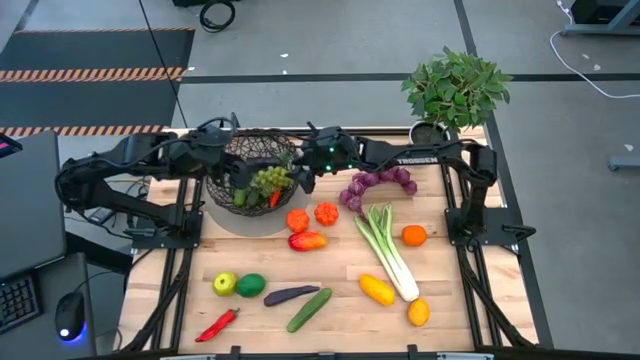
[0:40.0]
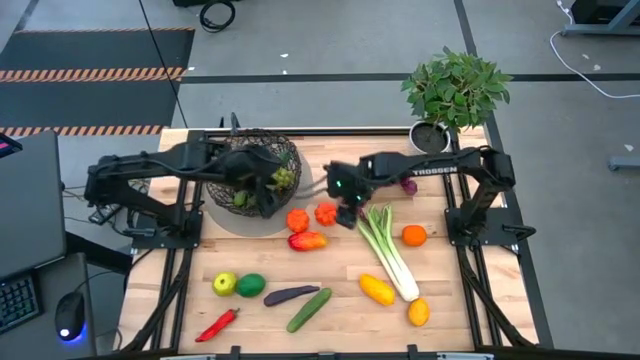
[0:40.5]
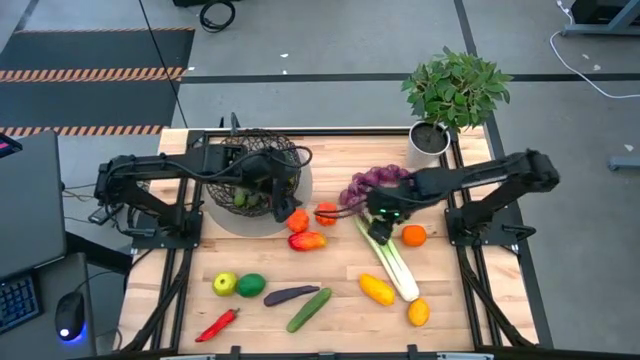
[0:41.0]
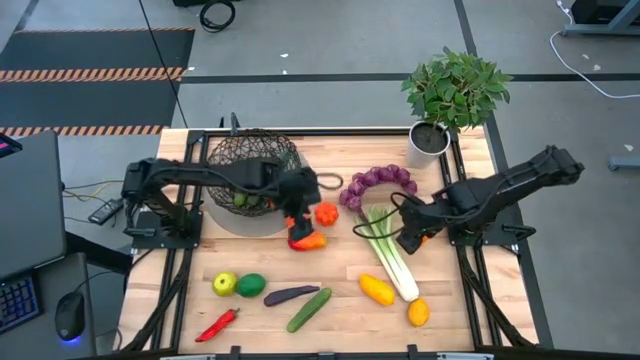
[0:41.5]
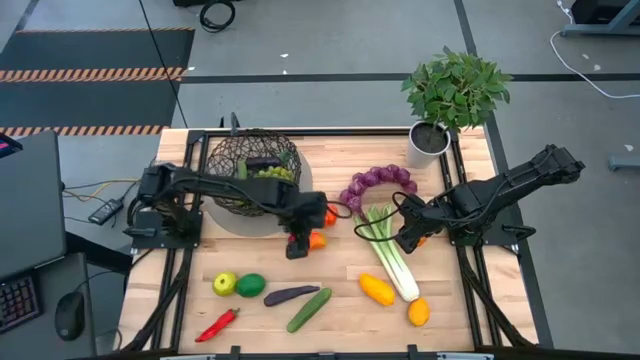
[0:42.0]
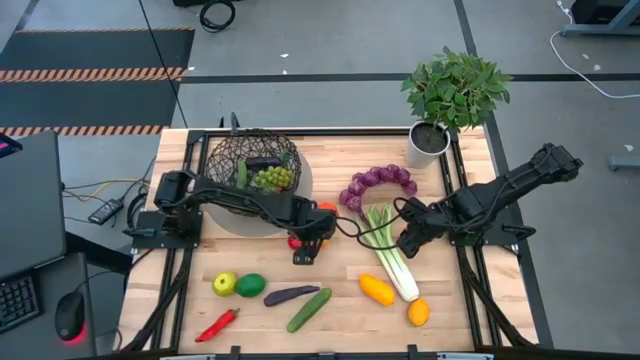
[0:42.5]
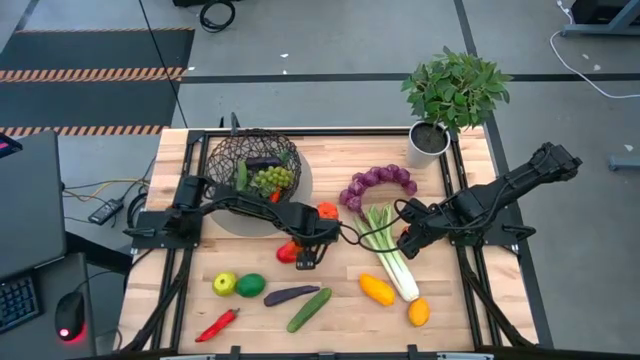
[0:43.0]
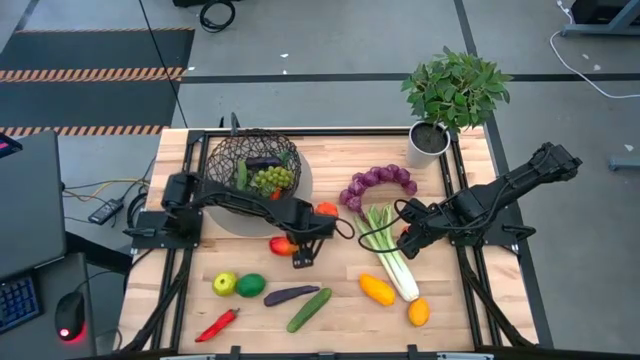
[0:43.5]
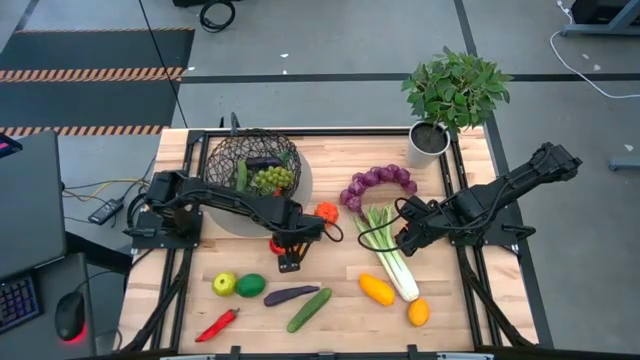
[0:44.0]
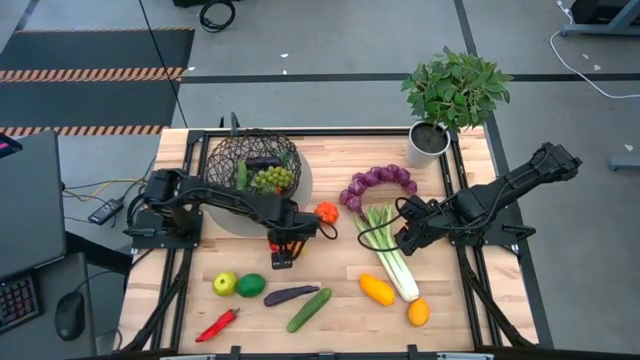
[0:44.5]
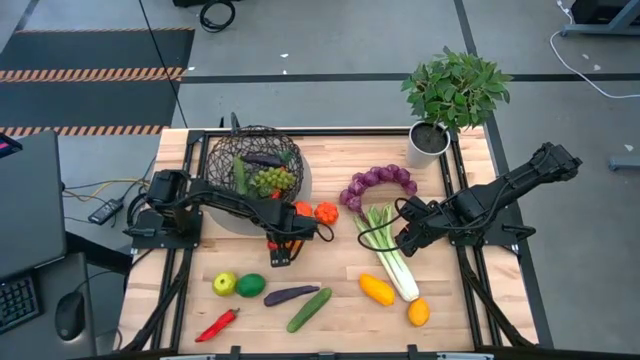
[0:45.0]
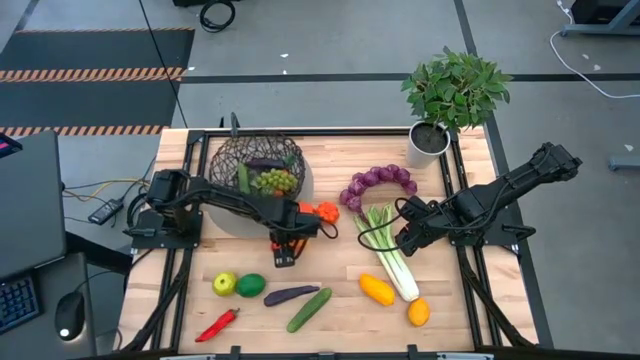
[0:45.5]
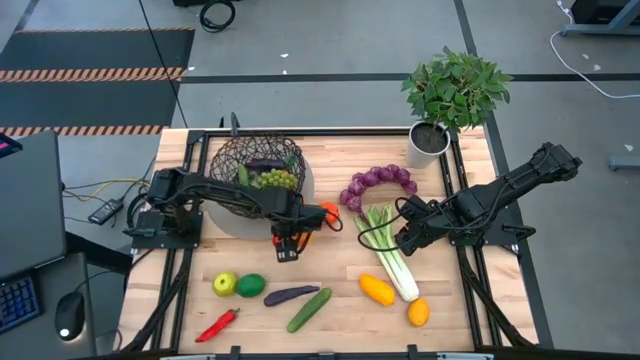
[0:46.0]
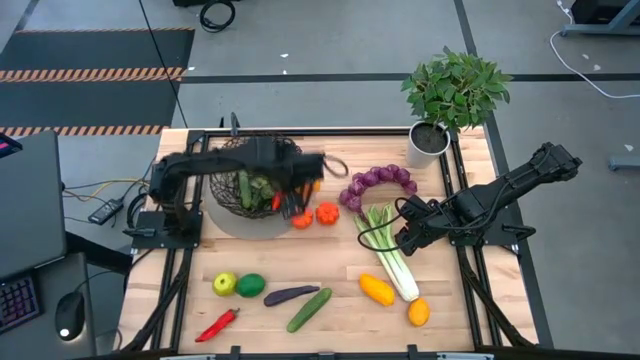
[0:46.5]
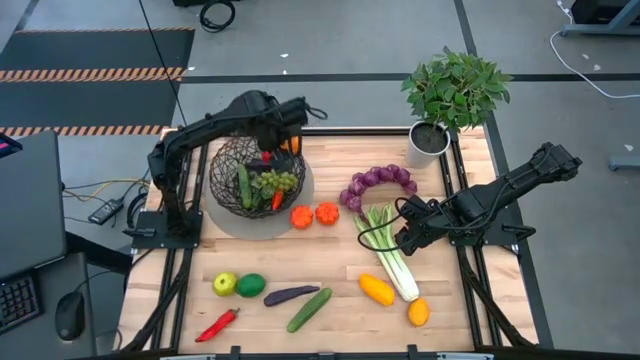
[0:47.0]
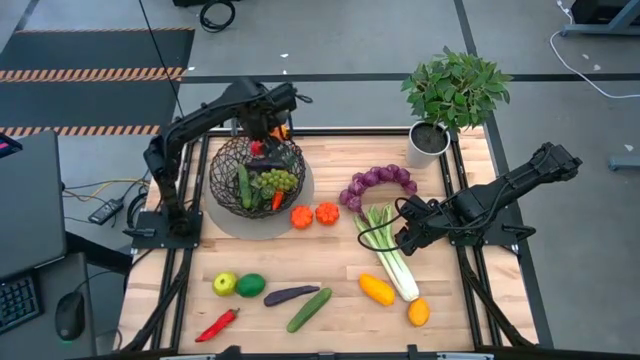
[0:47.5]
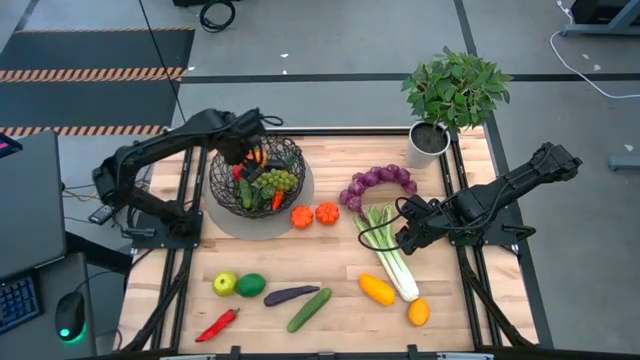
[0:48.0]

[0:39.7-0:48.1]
Task: Build produce basket
Put the red mango into the black wire basket

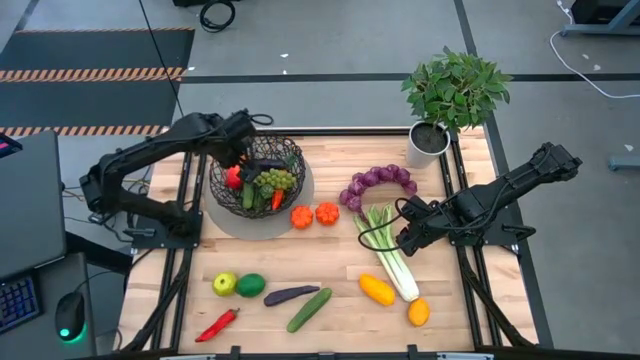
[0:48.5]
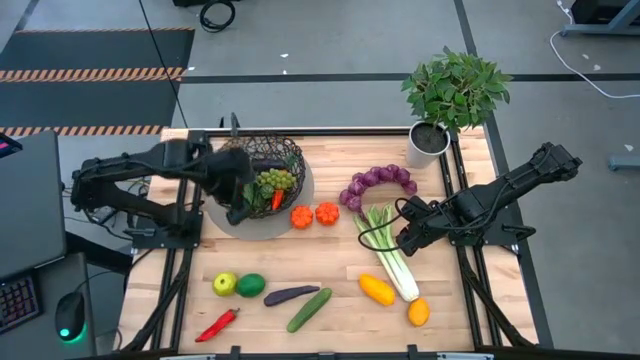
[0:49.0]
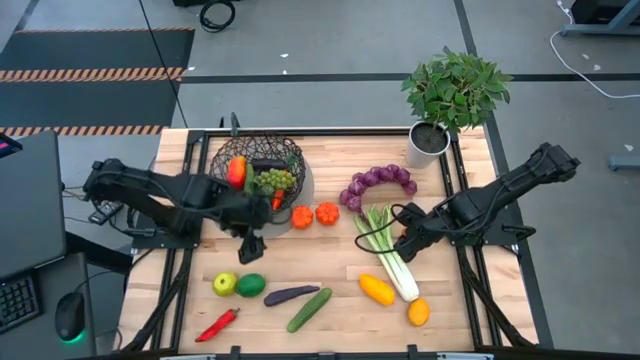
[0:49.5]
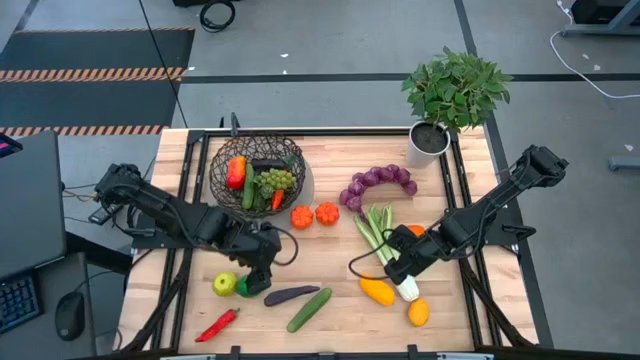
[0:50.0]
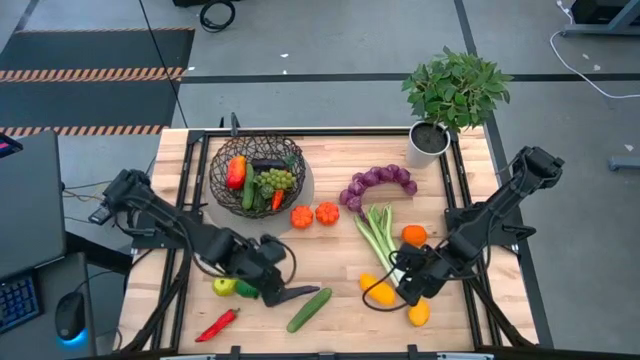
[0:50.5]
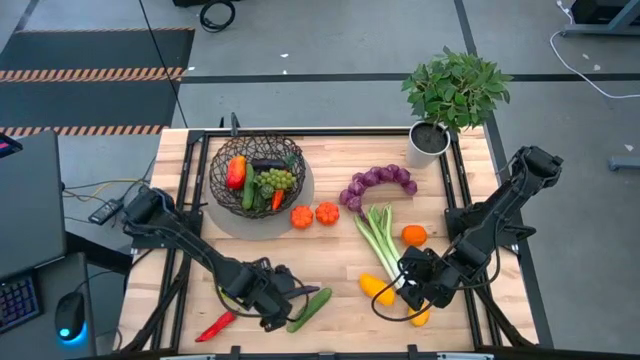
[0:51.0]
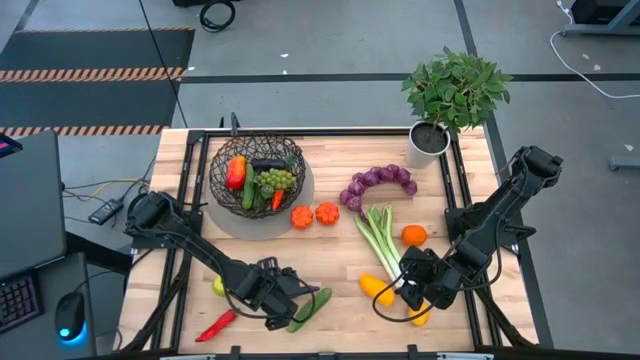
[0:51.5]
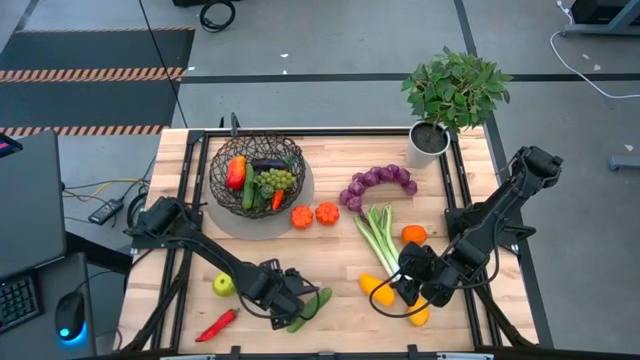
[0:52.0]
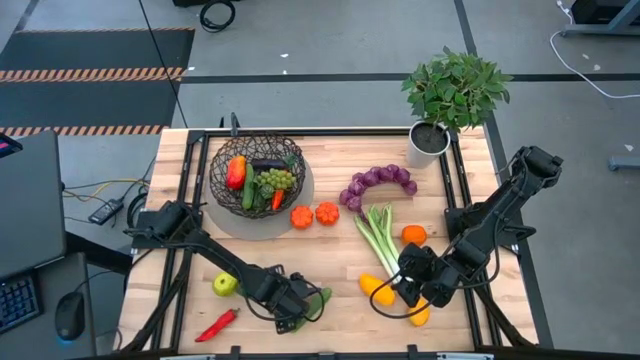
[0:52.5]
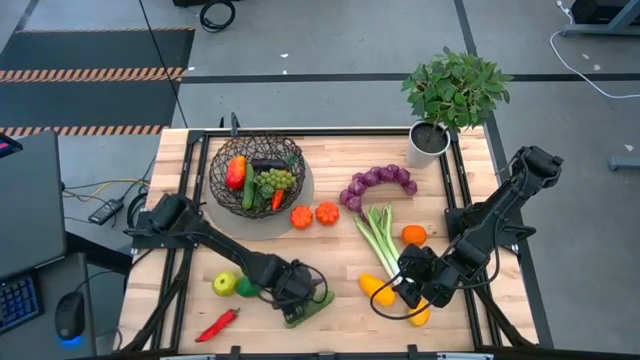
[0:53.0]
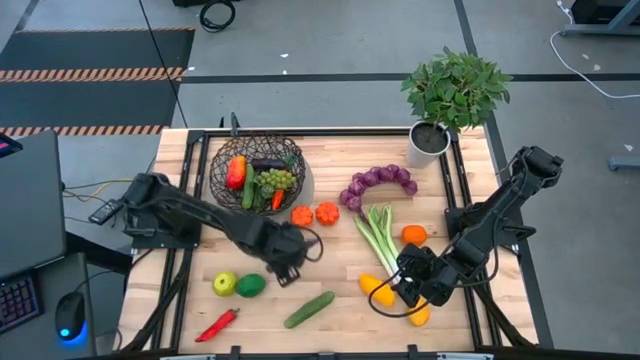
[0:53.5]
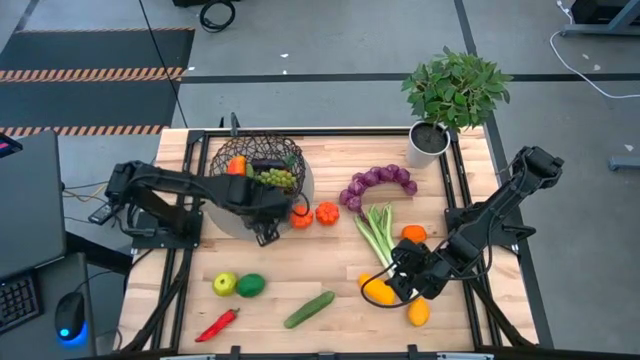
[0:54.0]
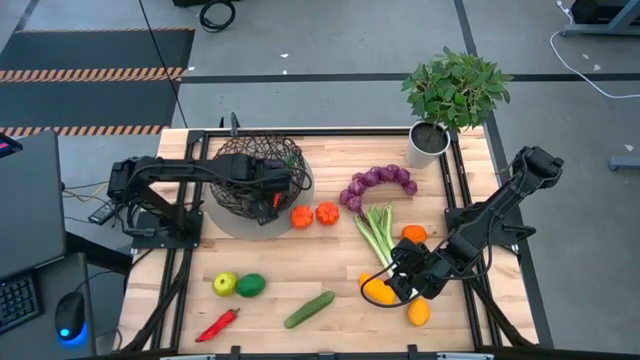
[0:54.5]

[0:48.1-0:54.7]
Put the purple eggplant into the black wire basket

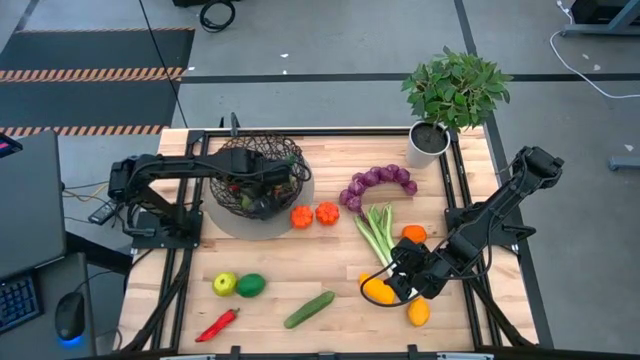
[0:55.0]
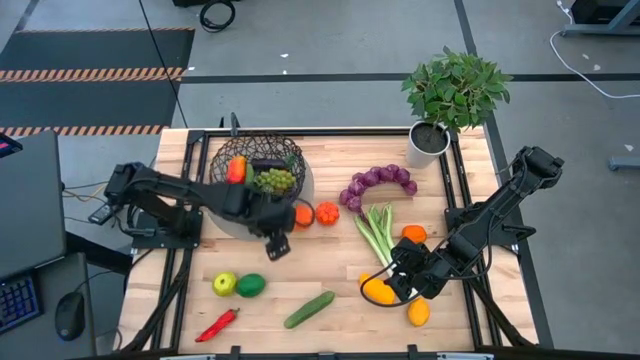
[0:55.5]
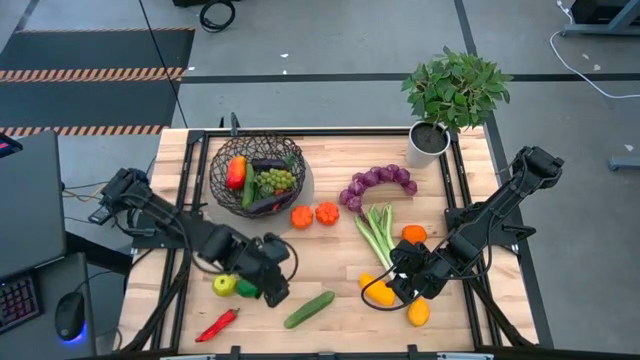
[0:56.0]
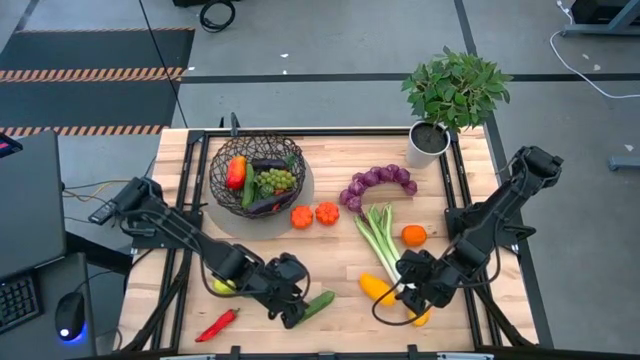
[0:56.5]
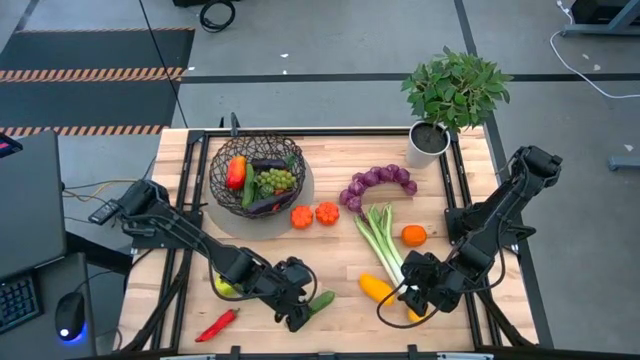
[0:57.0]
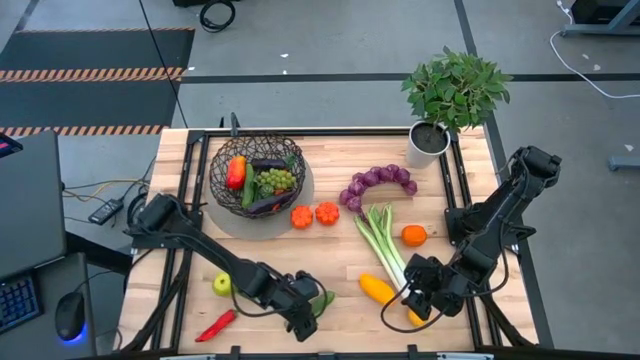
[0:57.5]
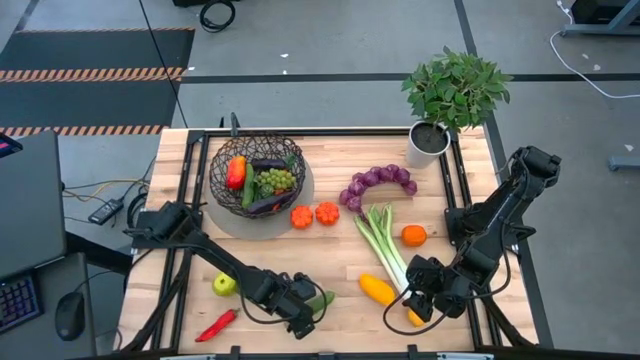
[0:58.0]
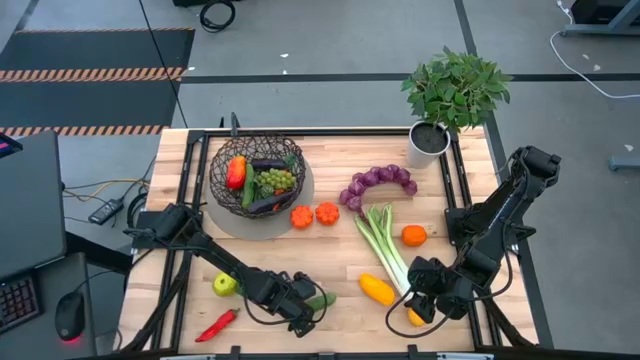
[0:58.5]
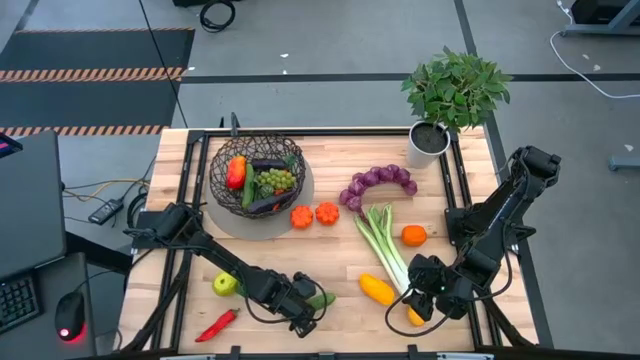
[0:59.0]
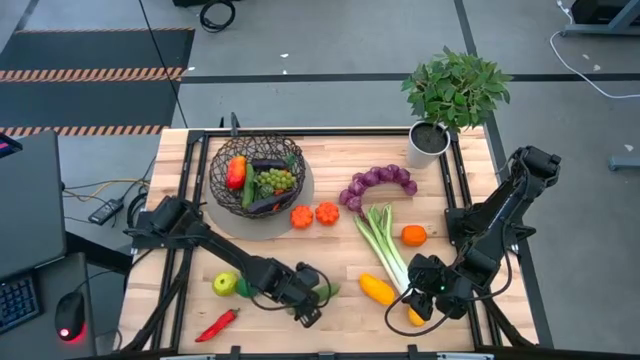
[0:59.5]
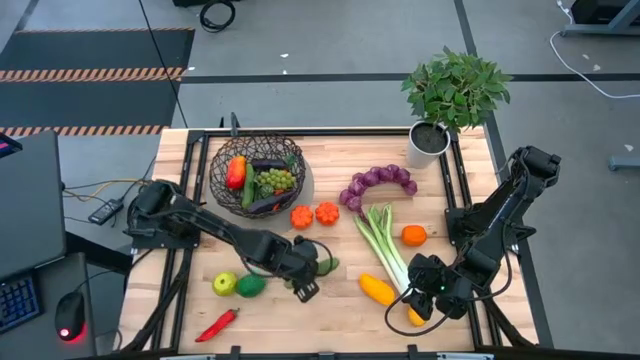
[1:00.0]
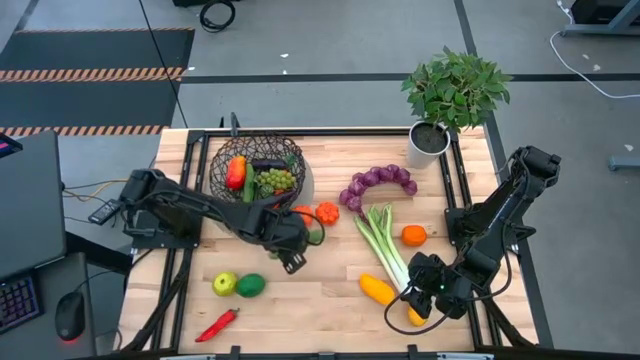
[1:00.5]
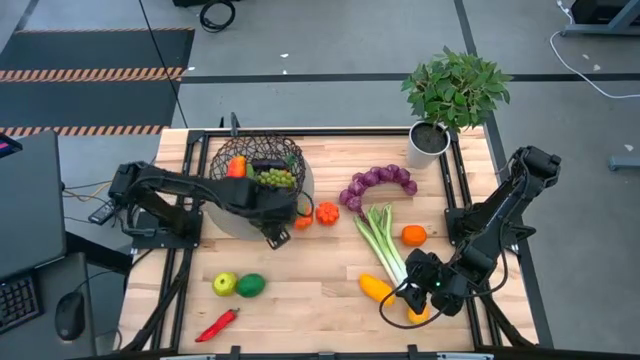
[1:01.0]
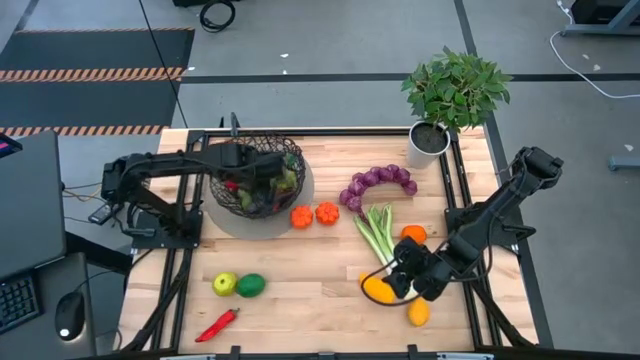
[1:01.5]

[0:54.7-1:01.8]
Put the green cucumber into the black wire basket
